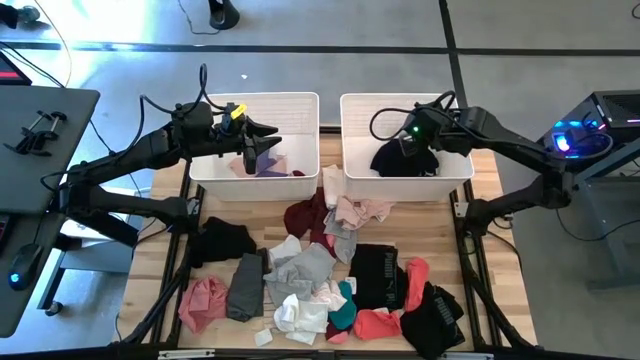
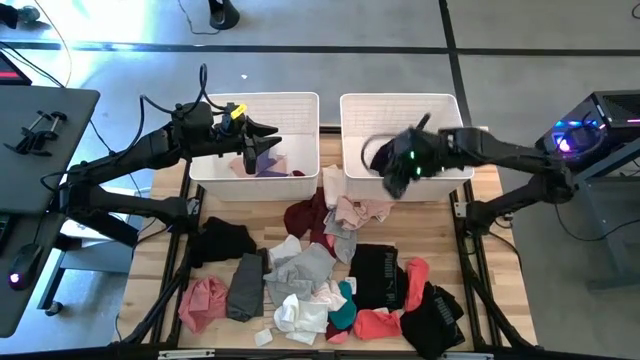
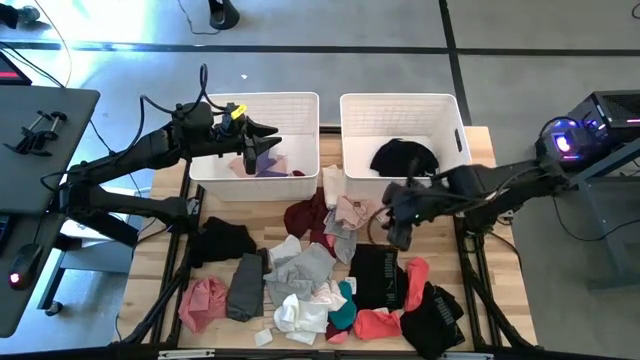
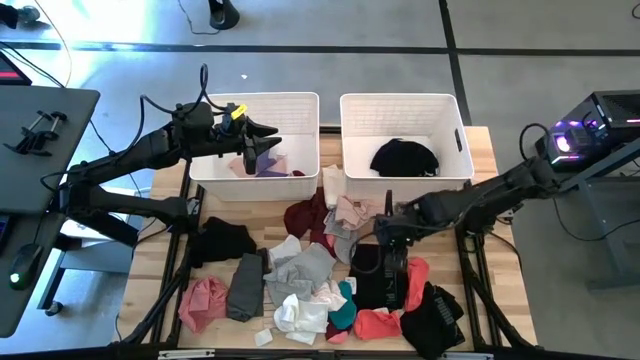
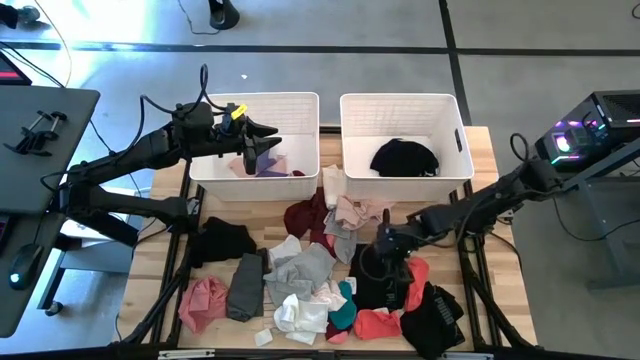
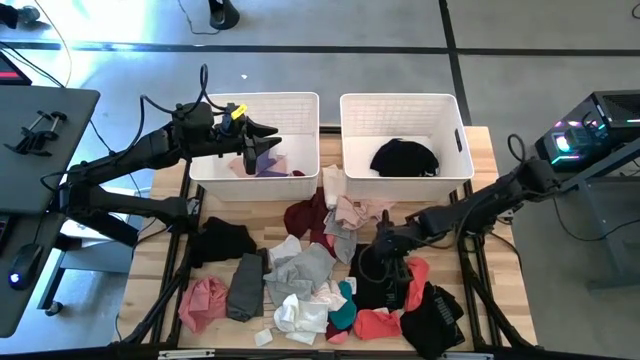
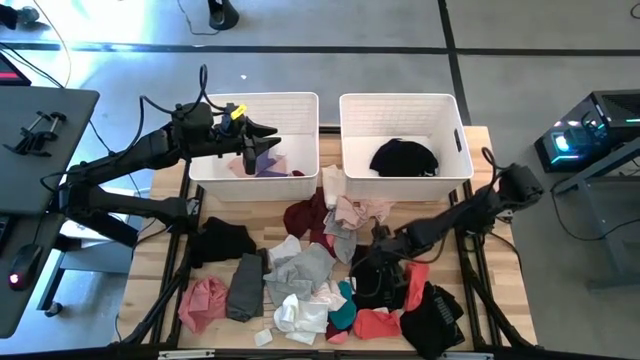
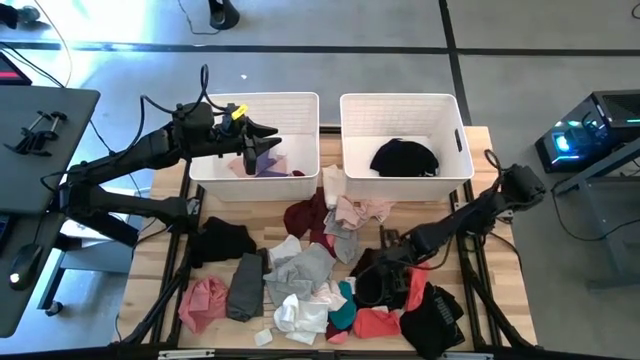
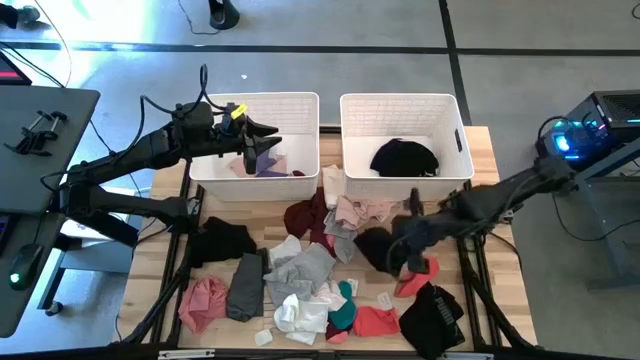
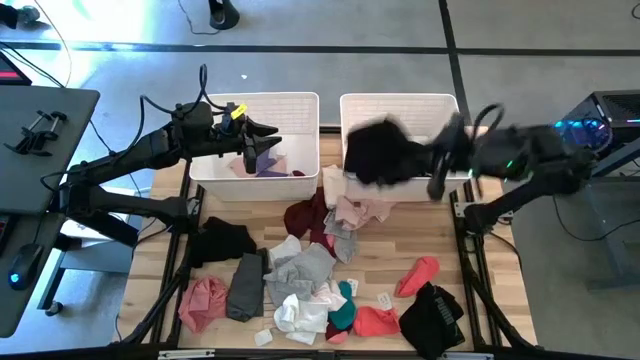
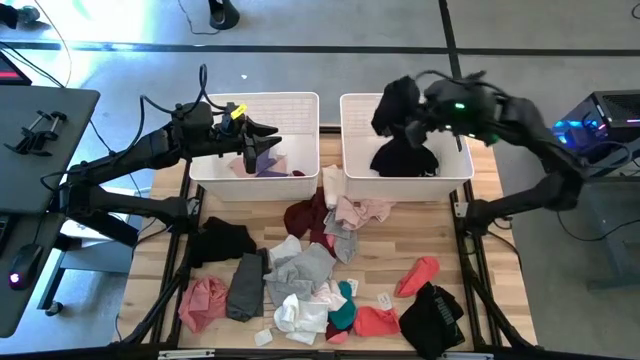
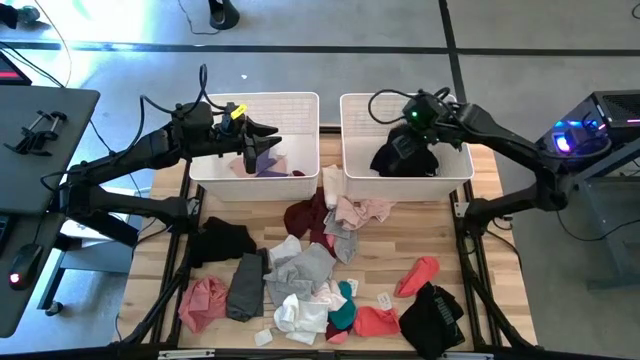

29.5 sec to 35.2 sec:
Task: Sort clothes
Put the black underwear into the right white laundry bin

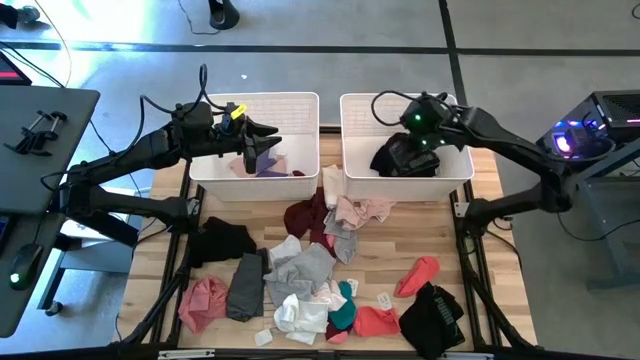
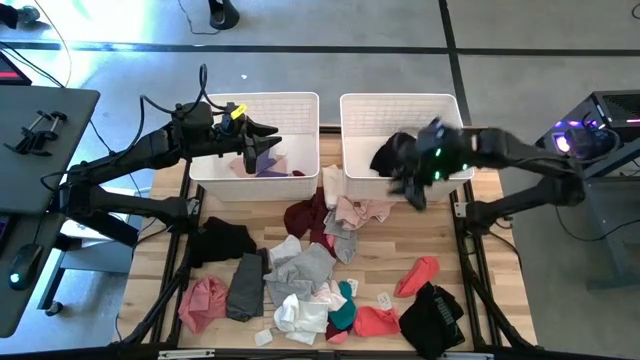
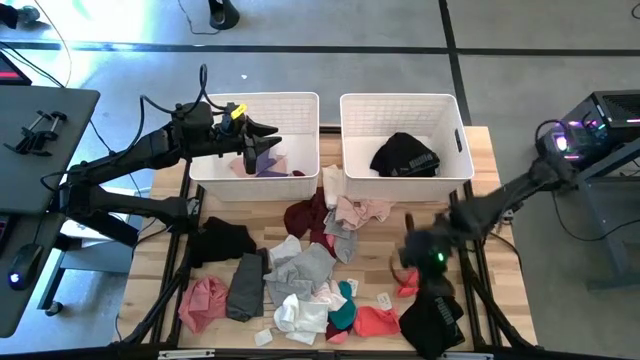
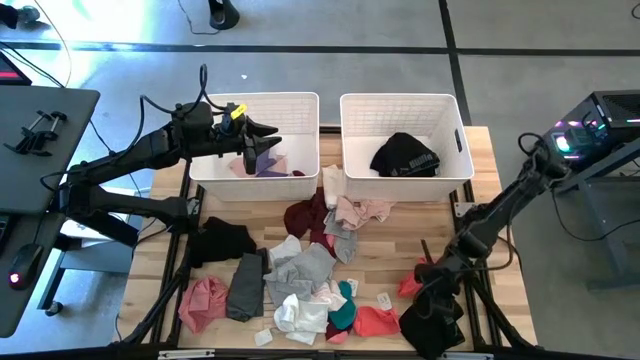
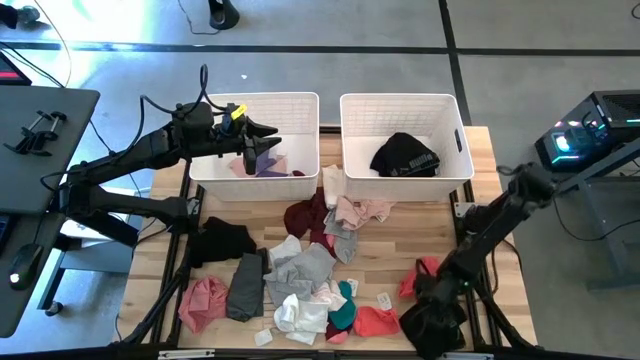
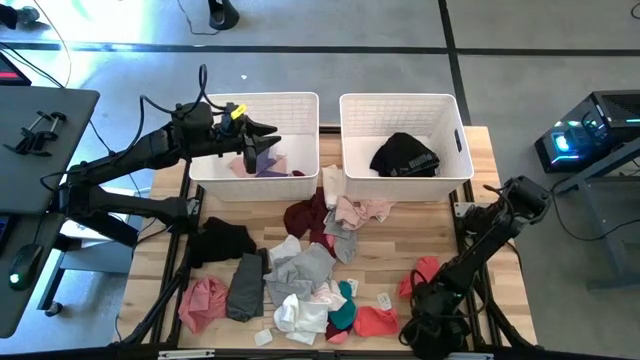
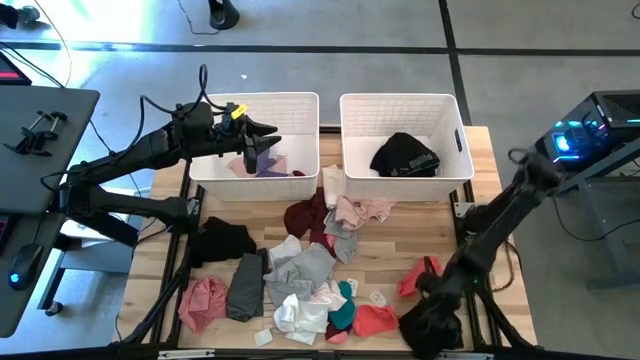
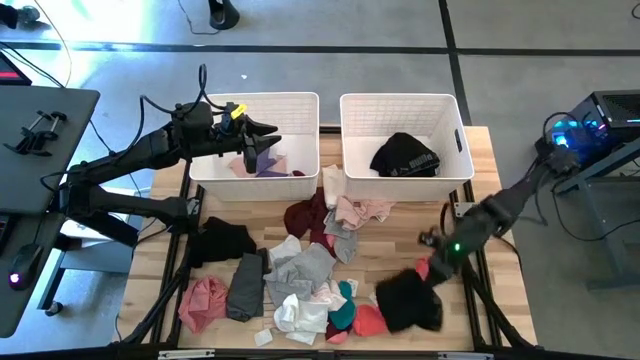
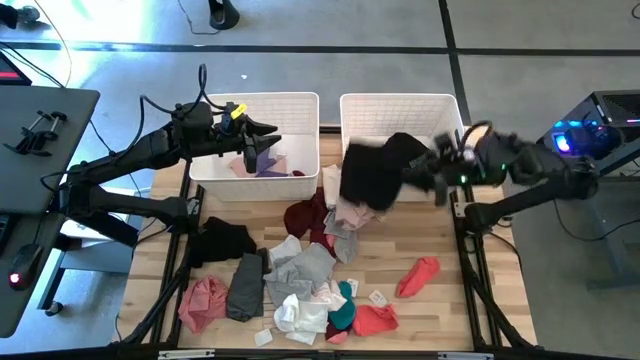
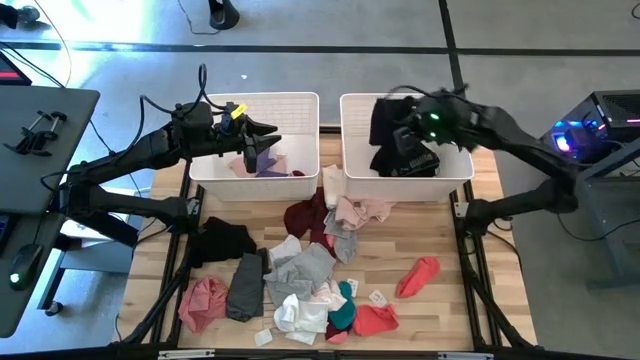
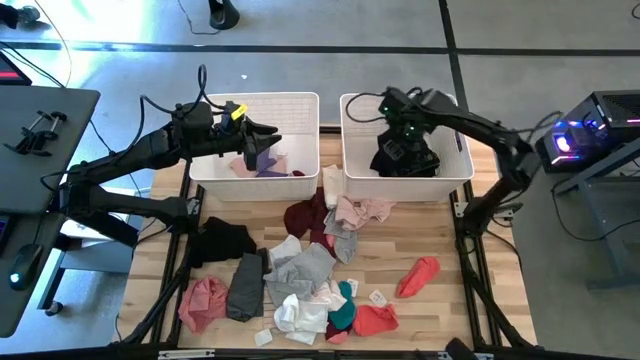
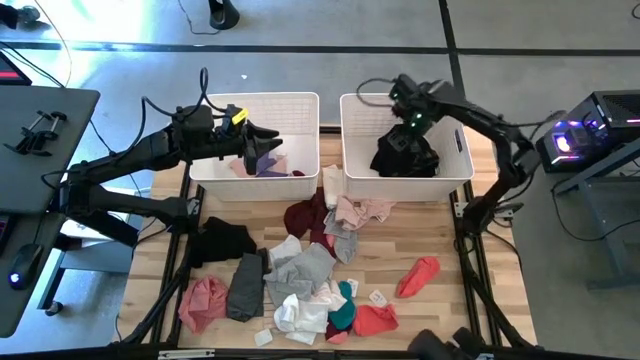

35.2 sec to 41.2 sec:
Put the black underwear into the right white laundry bin

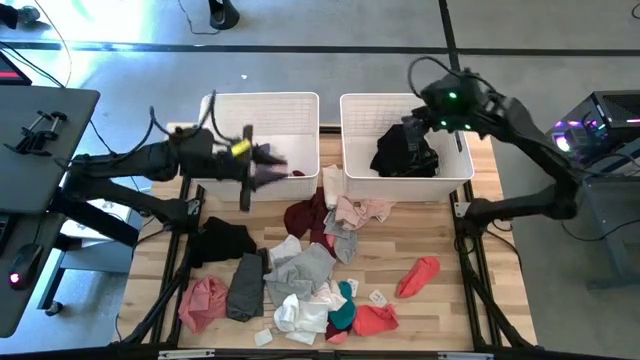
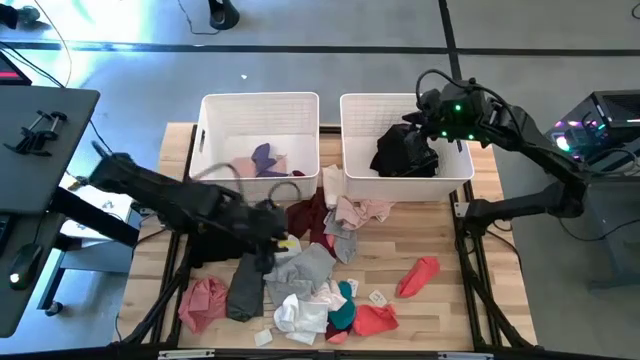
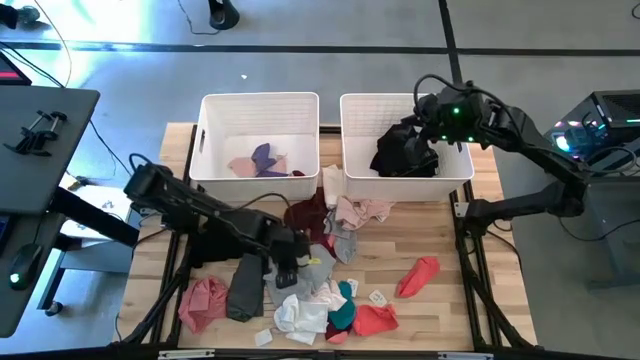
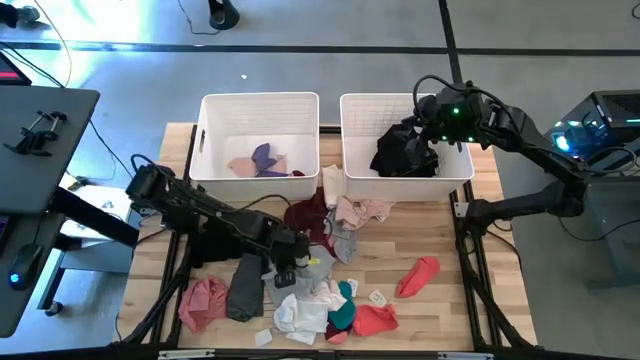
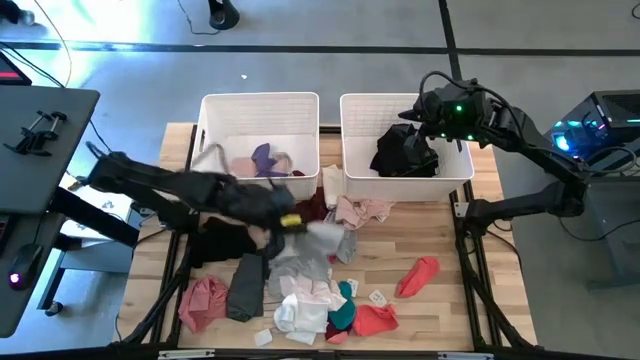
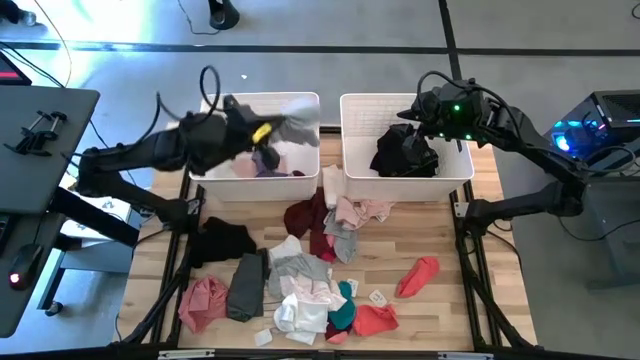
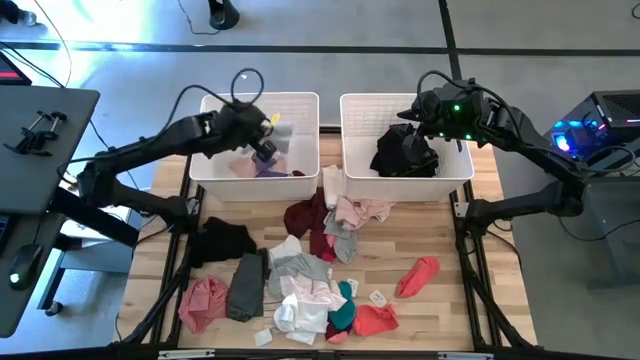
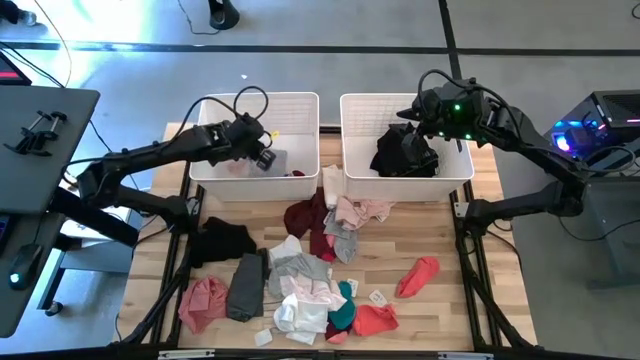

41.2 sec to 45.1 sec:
Put the gray underwear into the left white laundry bin

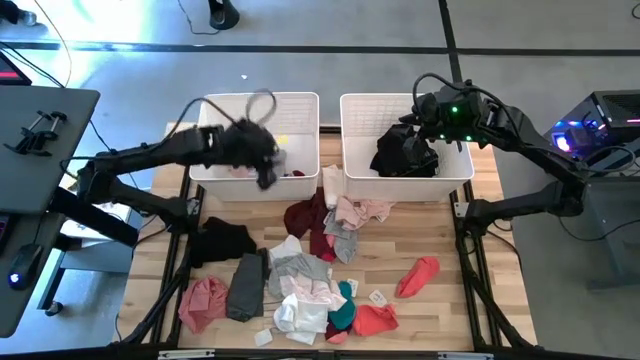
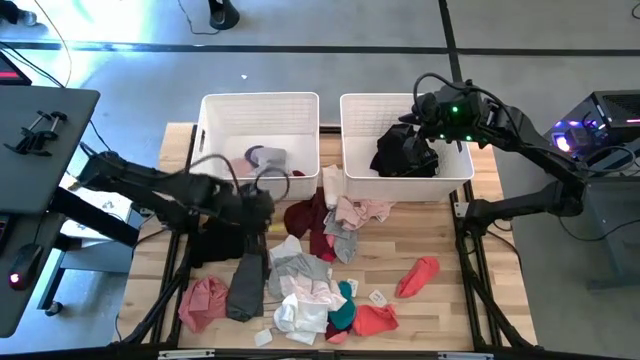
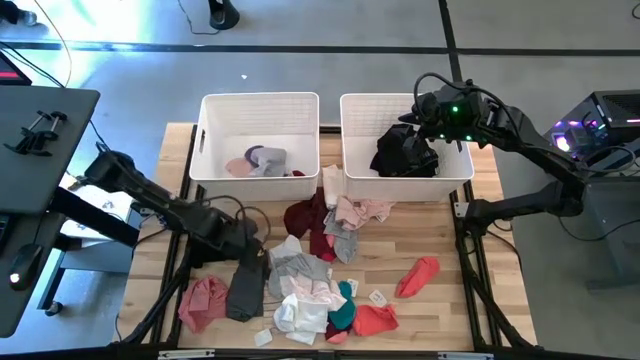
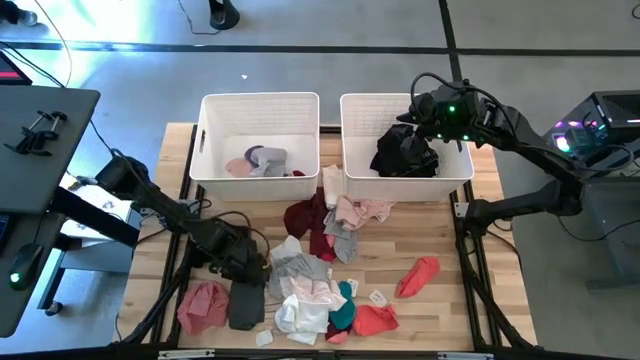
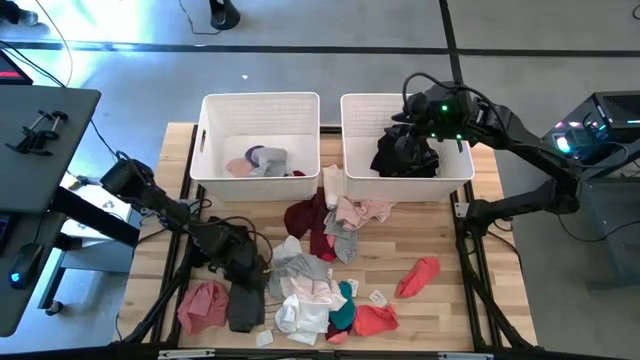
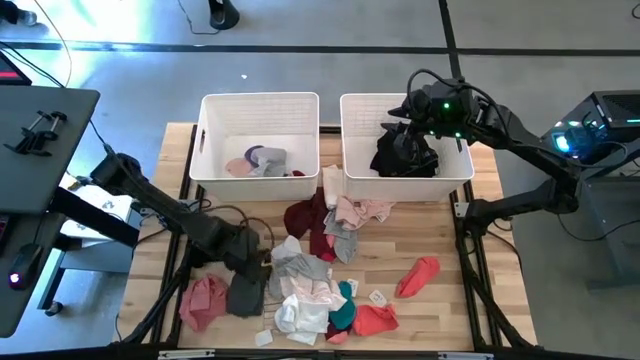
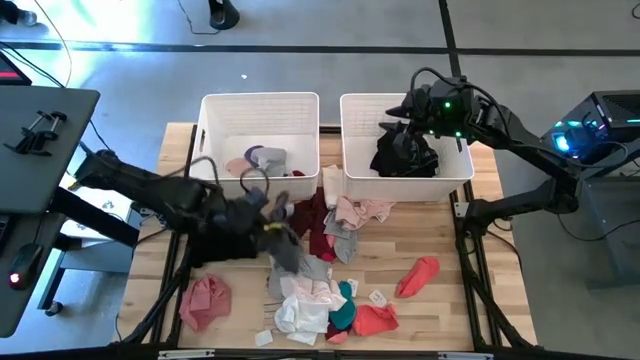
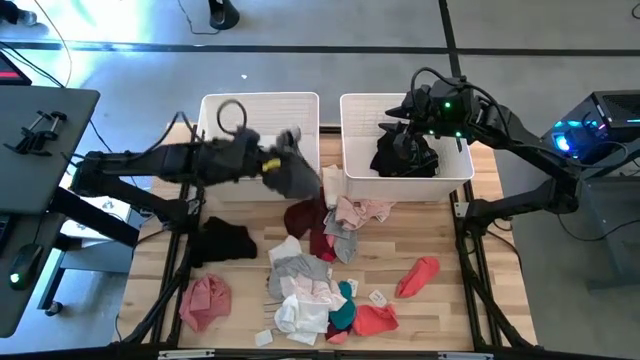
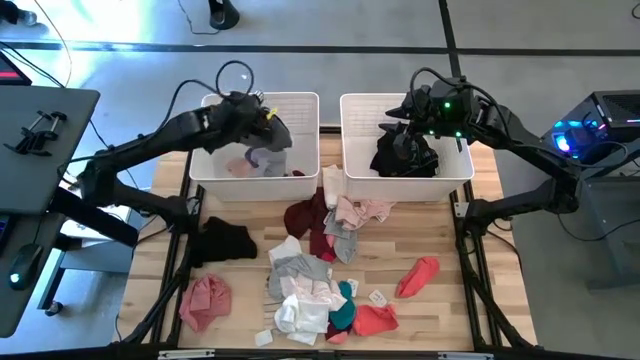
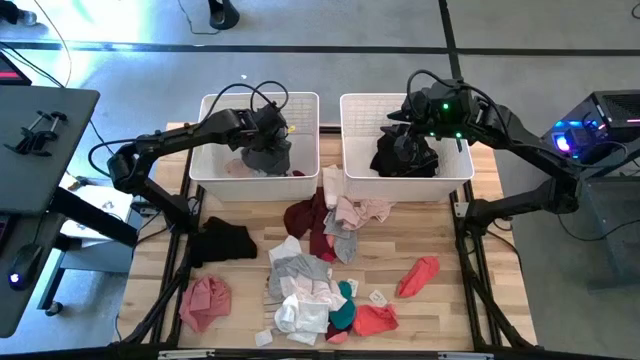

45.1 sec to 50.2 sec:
Put the dark gray underwear into the left white laundry bin
